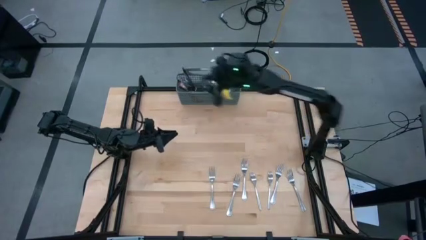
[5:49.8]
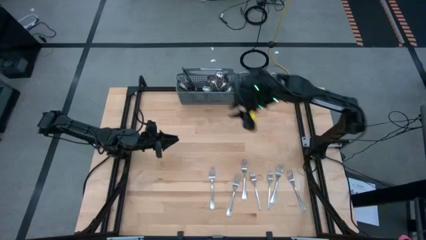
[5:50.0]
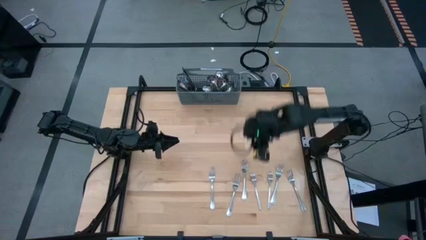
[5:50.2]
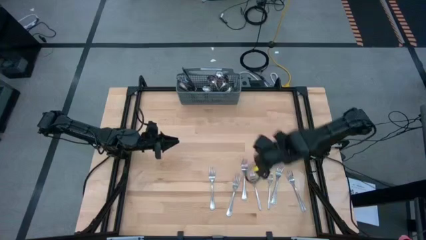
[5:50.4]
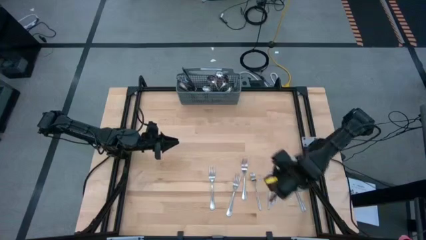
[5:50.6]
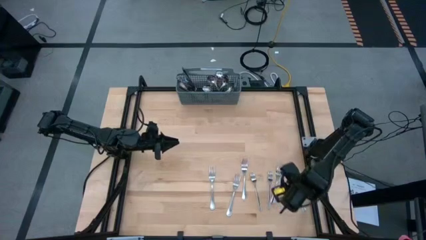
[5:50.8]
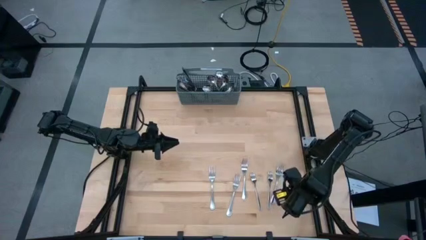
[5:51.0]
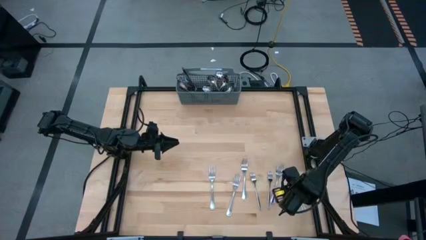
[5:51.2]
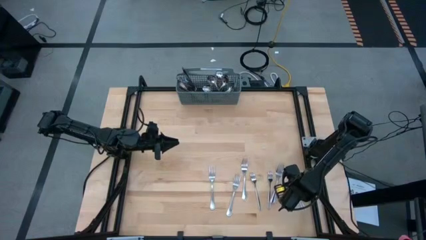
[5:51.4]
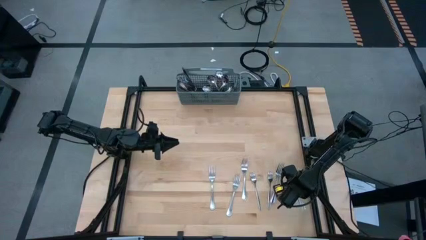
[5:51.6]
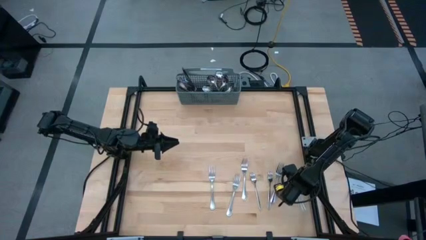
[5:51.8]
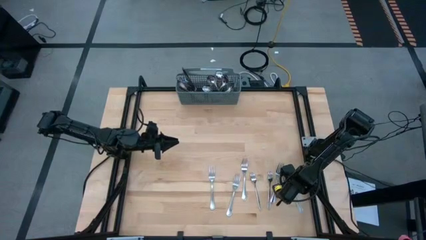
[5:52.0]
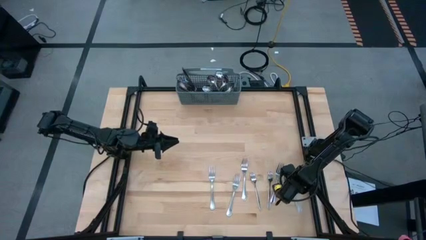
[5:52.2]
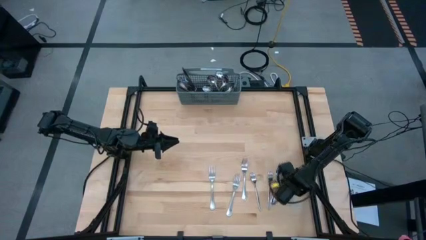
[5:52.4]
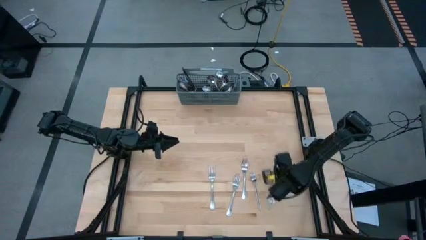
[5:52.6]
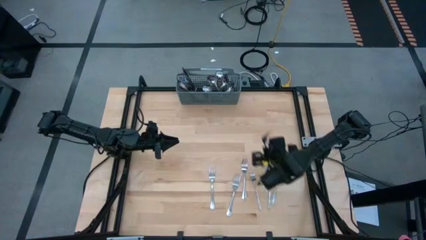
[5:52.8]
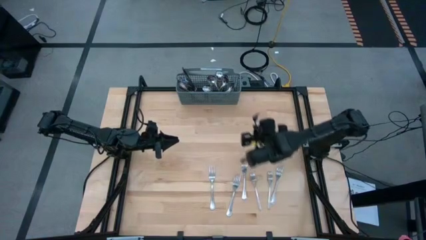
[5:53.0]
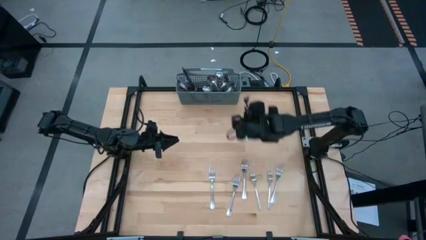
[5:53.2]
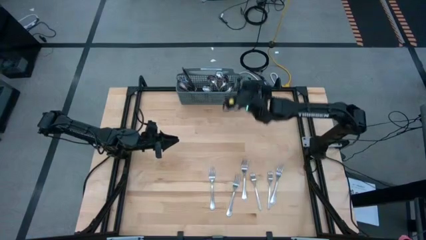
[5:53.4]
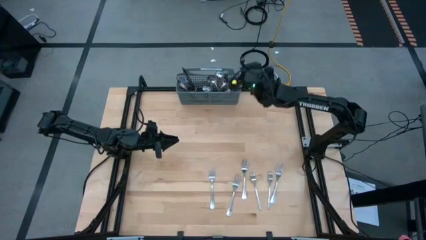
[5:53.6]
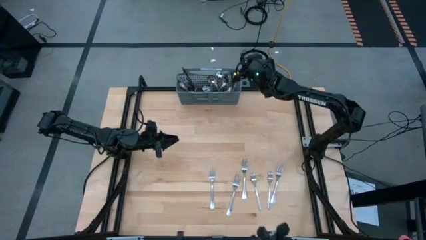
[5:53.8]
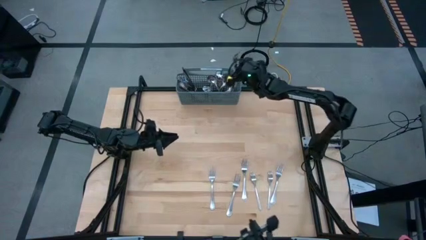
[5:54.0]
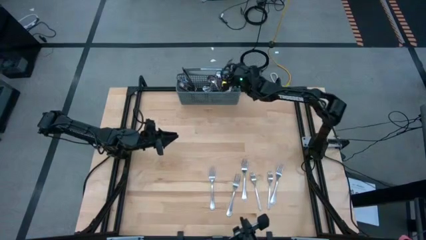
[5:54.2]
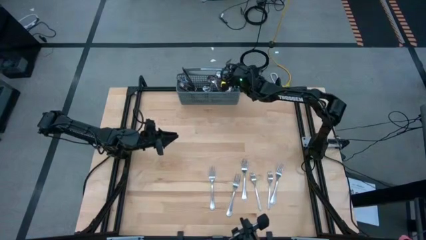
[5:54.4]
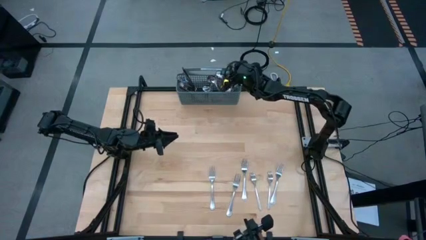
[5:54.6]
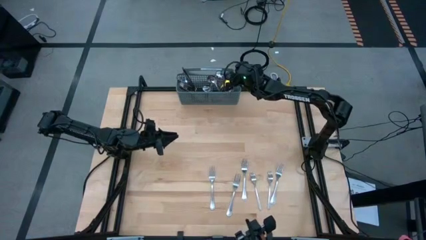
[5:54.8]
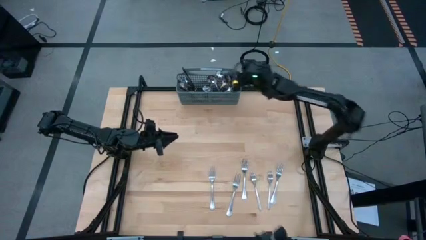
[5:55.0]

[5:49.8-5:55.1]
Task: Sort silverware
Put the silver fork into the utensil holder

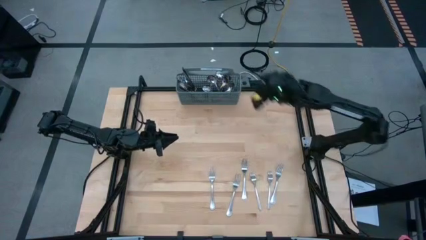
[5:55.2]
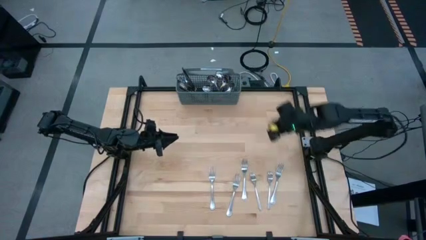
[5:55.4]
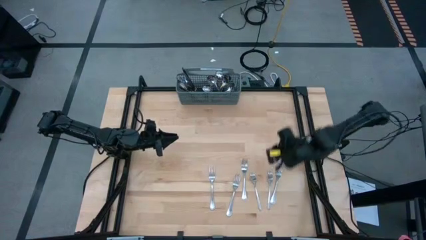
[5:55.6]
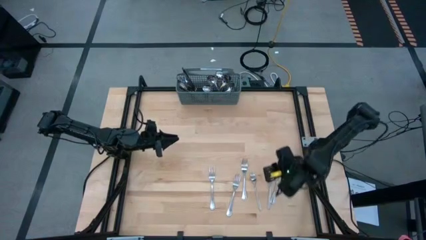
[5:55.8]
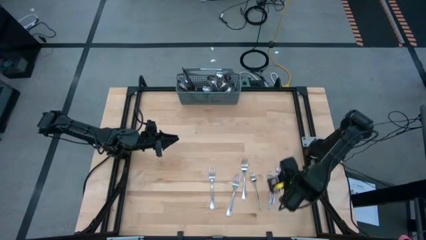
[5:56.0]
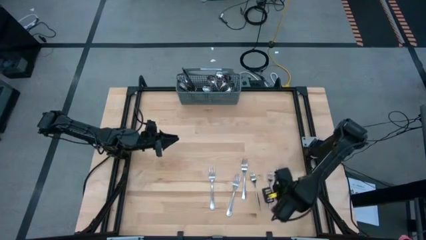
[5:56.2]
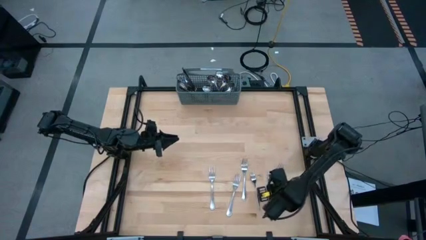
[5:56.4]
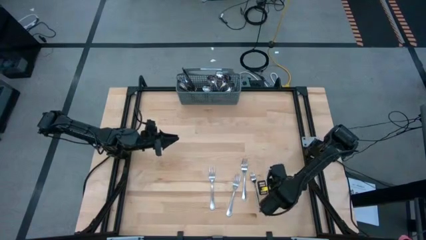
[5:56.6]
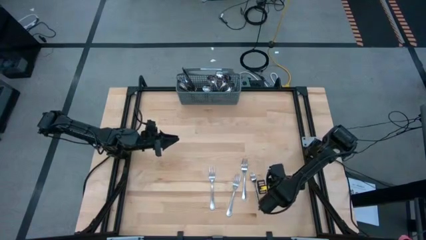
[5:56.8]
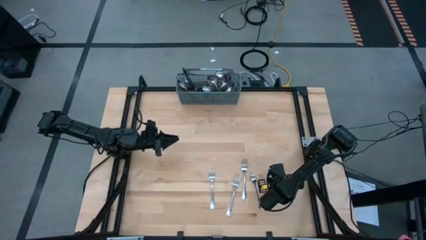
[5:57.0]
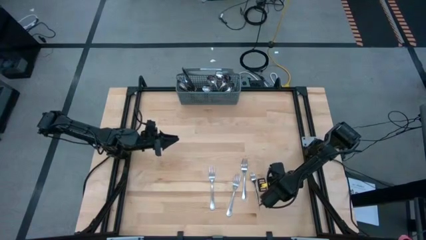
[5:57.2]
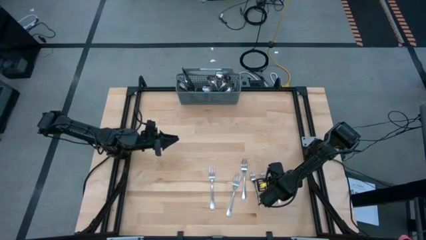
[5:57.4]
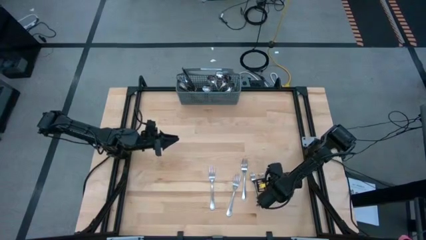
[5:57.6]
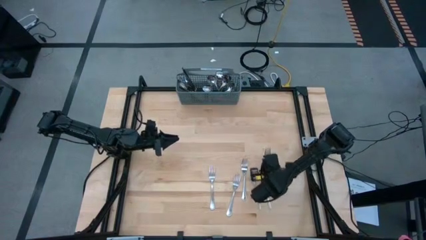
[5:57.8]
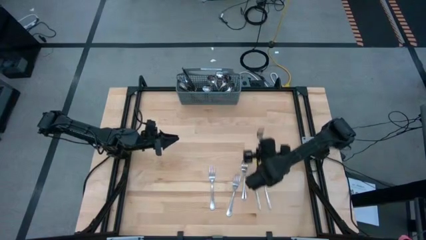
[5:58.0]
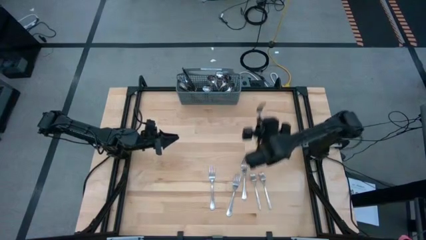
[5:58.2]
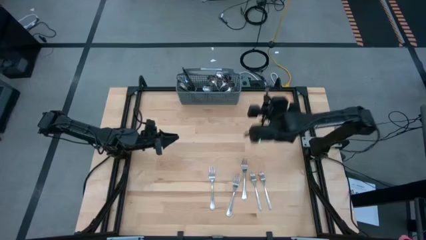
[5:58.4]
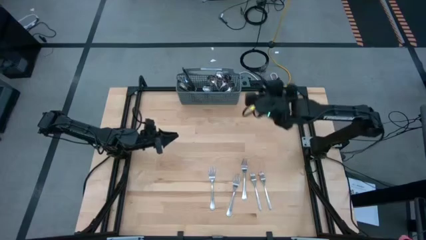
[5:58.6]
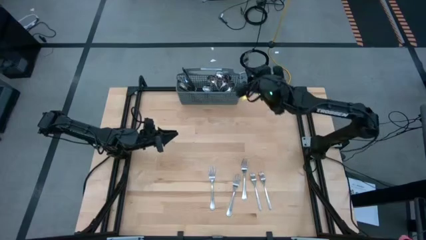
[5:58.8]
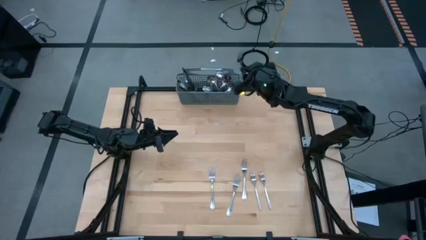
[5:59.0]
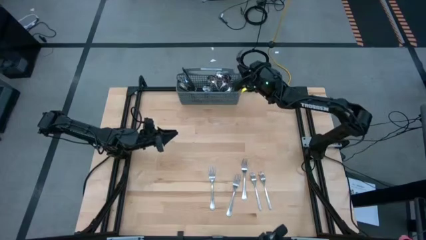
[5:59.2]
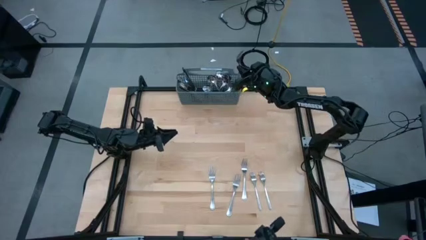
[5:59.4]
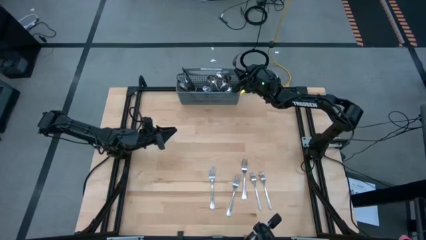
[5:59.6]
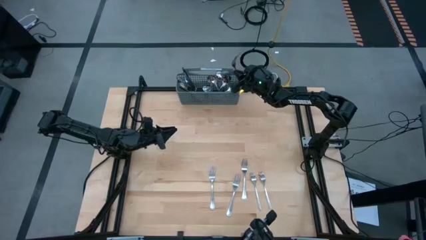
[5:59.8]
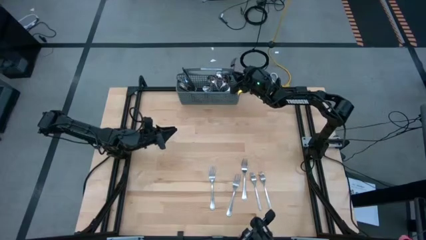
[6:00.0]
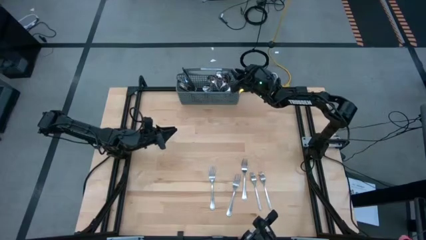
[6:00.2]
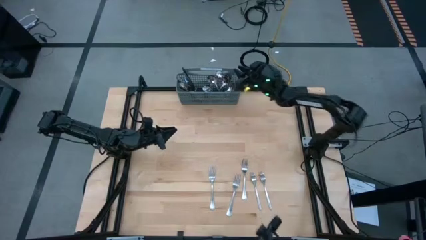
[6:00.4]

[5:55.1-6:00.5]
Put the silver fork into the utensil holder

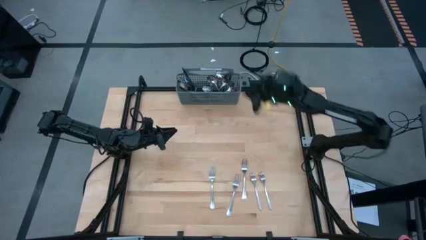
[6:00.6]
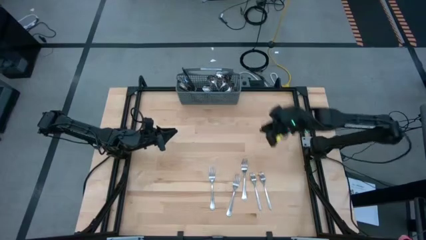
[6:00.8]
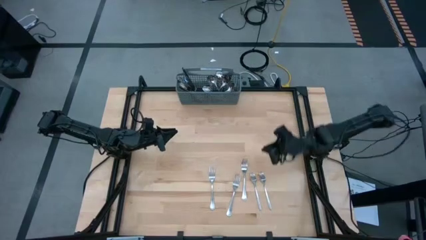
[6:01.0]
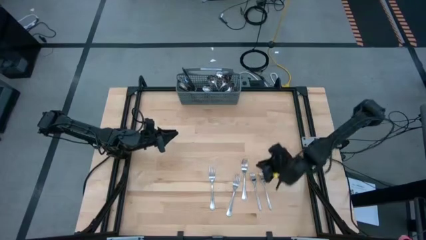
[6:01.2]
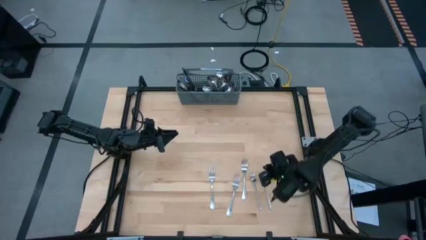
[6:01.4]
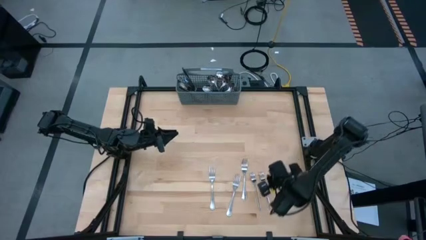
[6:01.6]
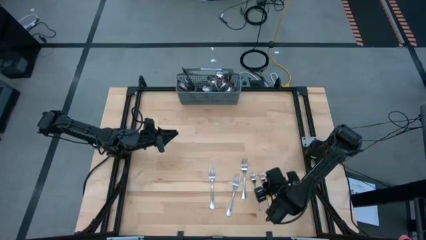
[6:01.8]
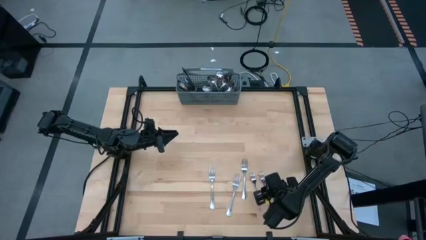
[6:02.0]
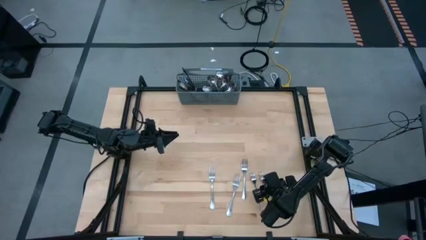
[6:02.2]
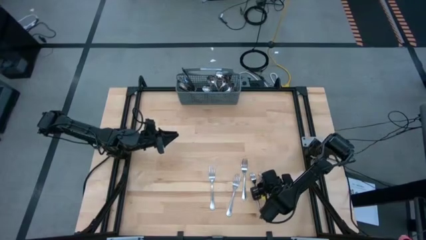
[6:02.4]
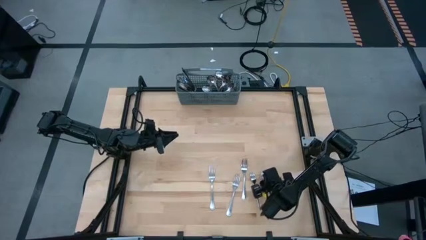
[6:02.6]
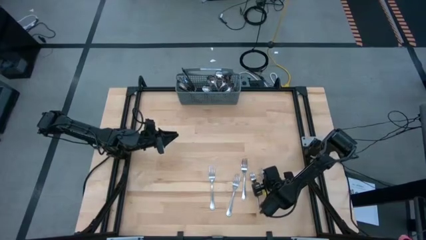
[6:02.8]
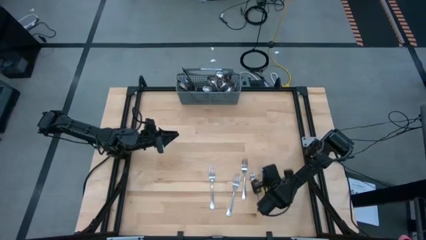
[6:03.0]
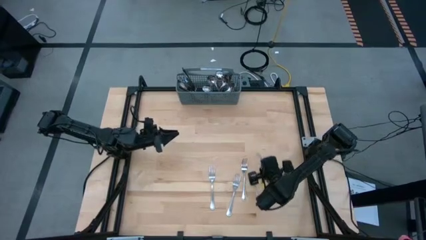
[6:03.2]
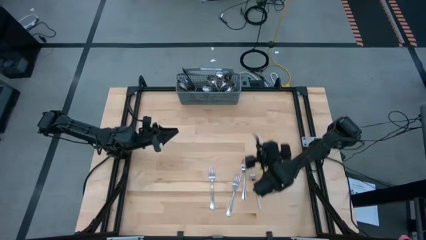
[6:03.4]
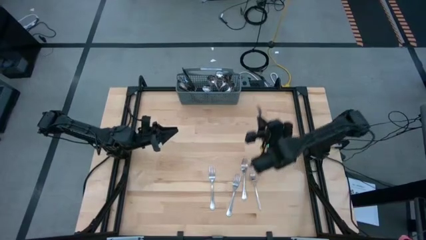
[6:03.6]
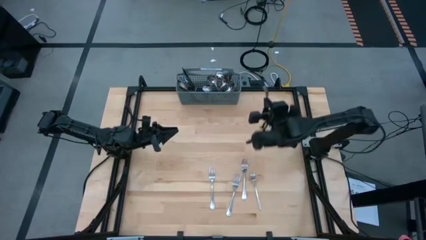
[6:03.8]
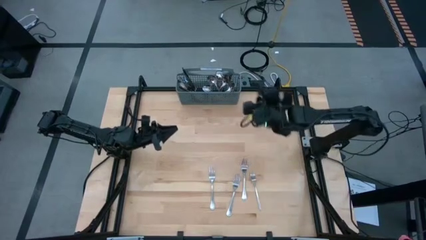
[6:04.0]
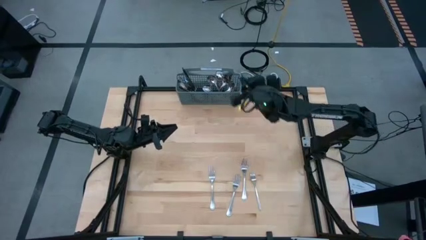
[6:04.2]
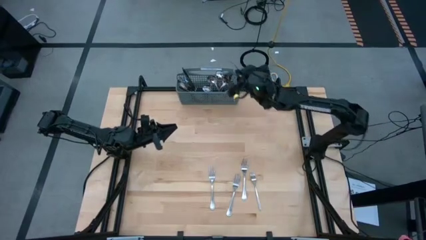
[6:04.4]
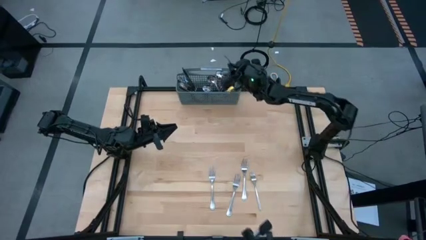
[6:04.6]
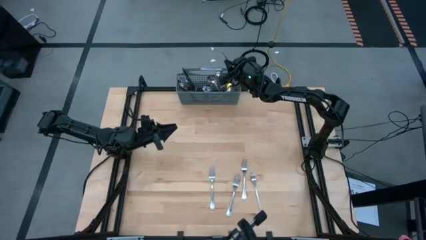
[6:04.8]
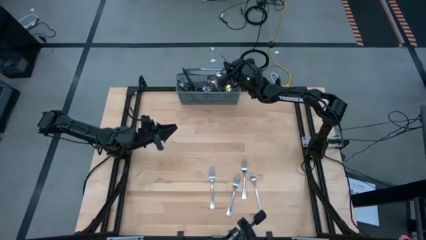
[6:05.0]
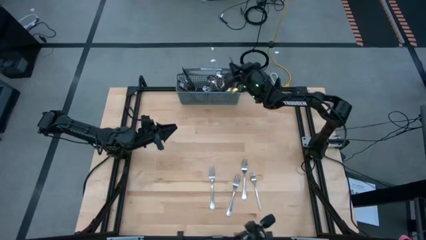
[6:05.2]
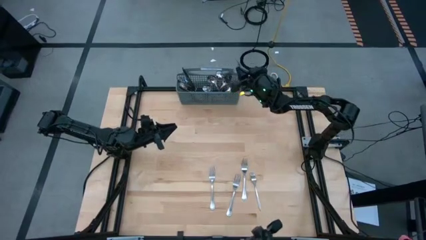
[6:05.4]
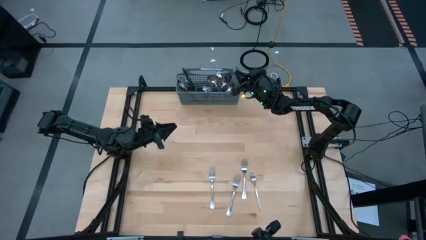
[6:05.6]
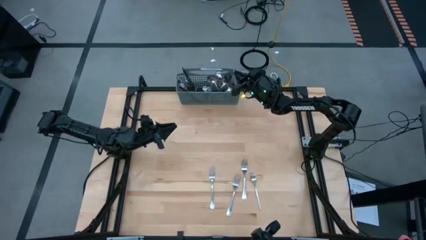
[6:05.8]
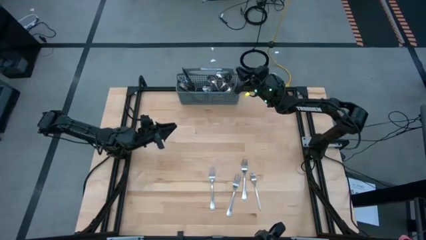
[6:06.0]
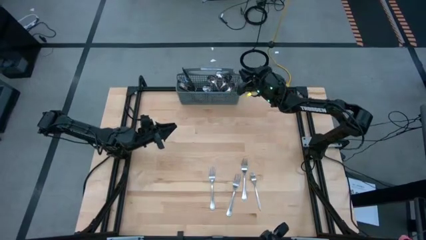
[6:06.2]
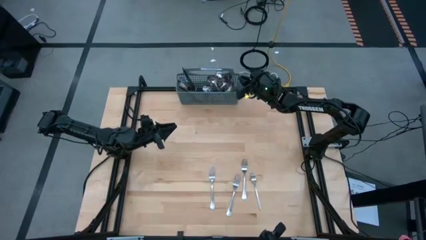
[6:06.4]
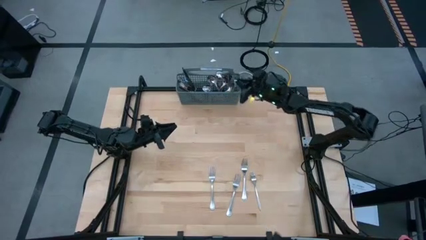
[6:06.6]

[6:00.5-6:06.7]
Put the silver fork into the utensil holder
